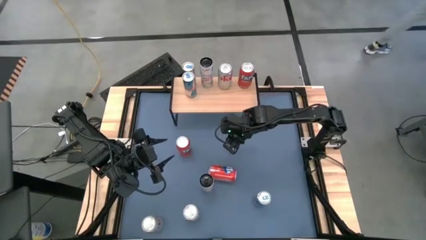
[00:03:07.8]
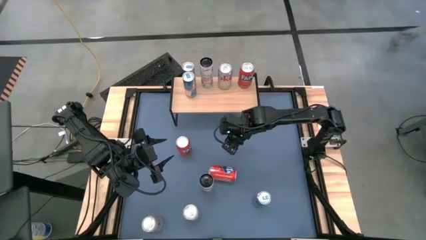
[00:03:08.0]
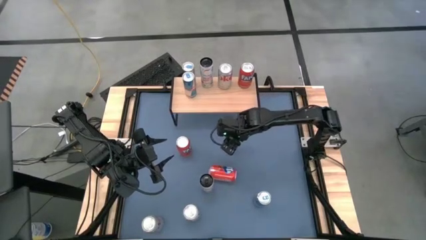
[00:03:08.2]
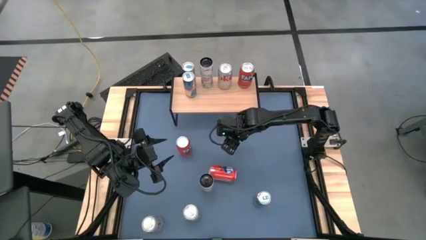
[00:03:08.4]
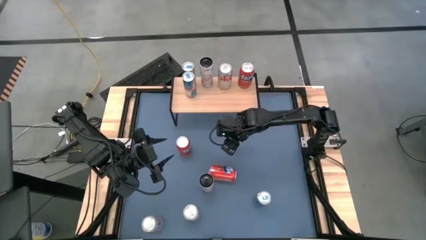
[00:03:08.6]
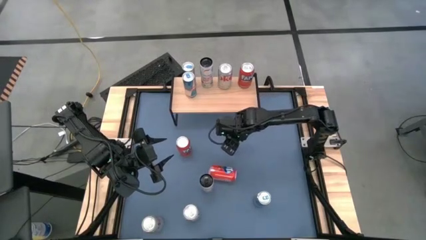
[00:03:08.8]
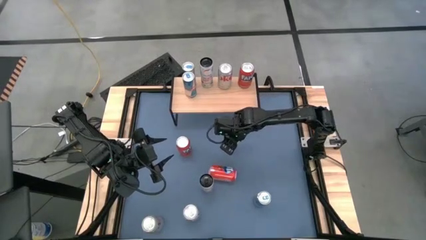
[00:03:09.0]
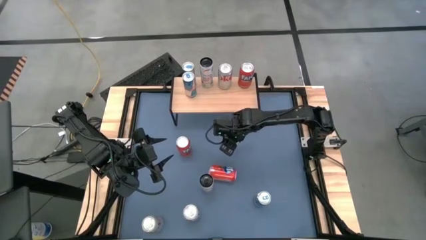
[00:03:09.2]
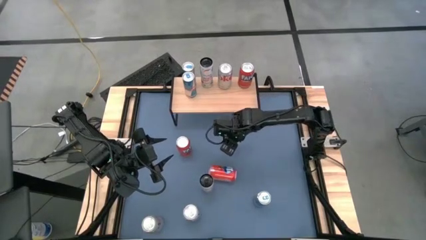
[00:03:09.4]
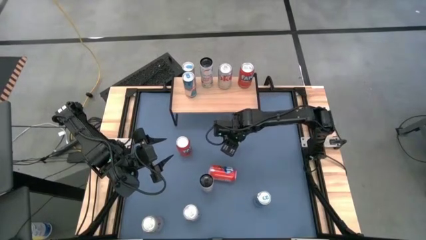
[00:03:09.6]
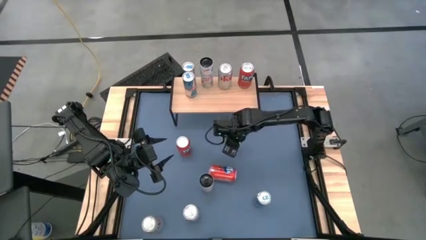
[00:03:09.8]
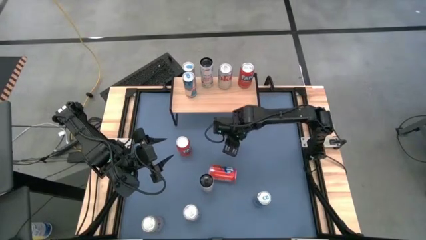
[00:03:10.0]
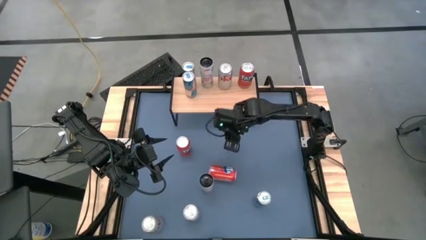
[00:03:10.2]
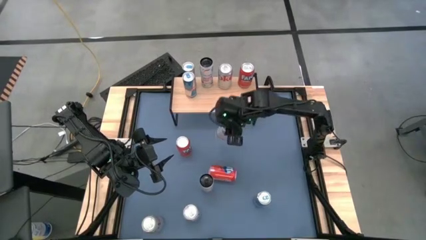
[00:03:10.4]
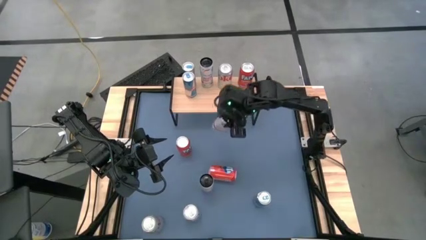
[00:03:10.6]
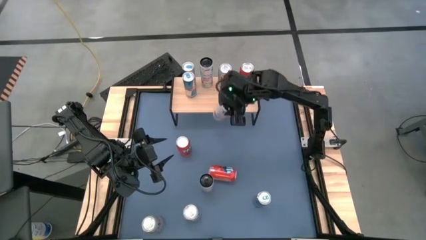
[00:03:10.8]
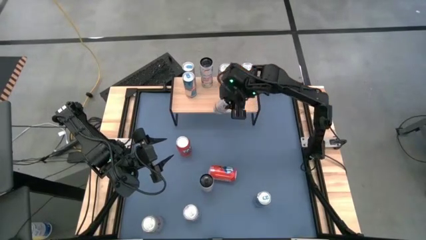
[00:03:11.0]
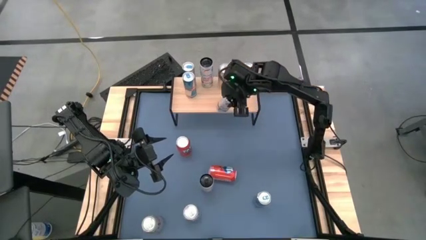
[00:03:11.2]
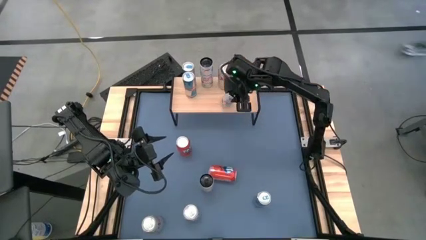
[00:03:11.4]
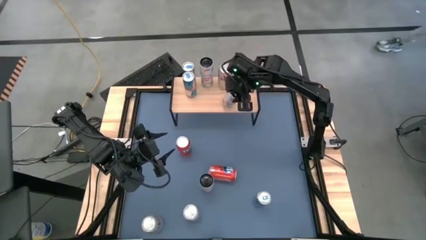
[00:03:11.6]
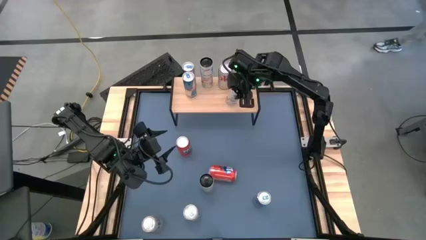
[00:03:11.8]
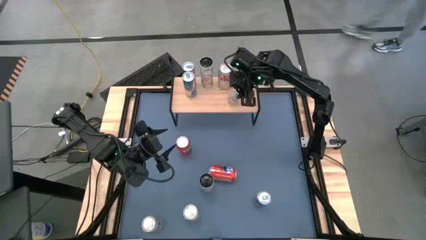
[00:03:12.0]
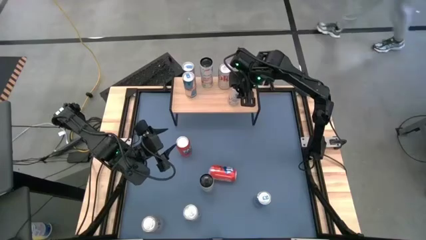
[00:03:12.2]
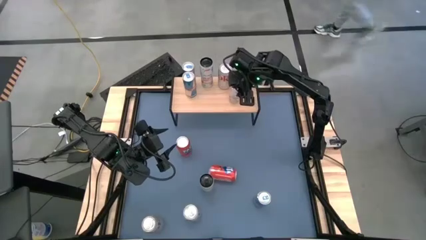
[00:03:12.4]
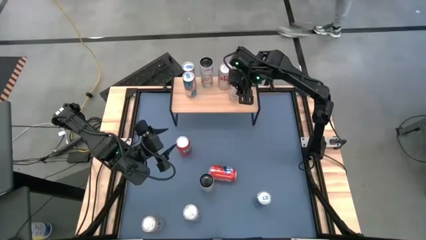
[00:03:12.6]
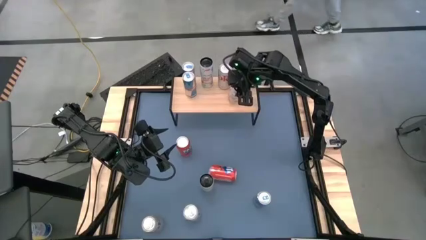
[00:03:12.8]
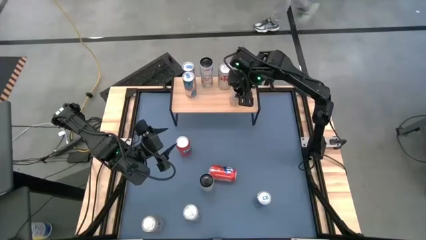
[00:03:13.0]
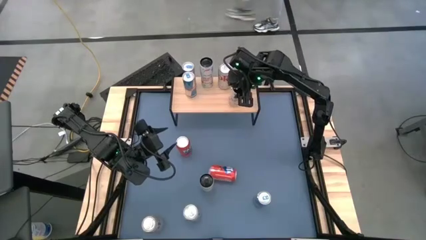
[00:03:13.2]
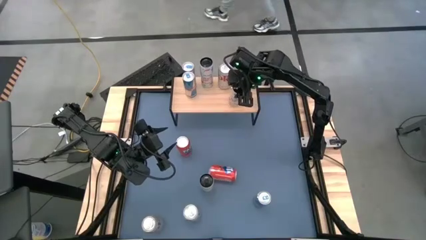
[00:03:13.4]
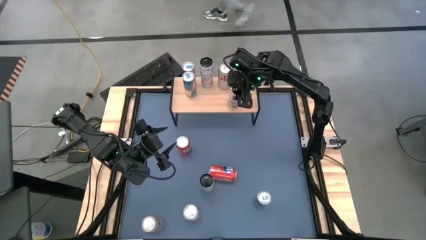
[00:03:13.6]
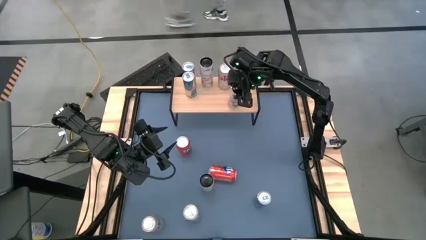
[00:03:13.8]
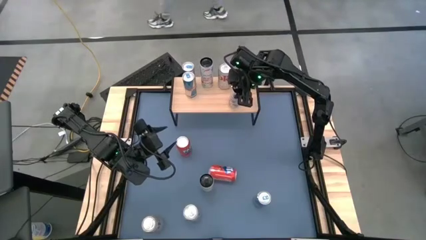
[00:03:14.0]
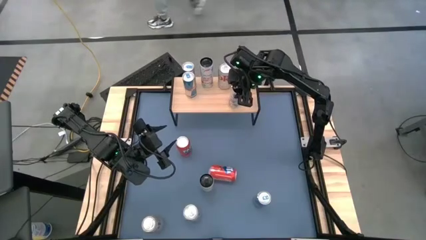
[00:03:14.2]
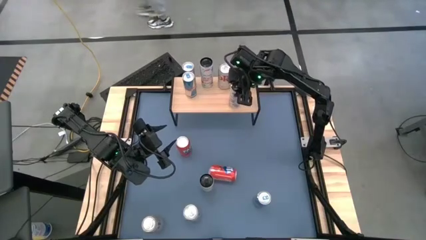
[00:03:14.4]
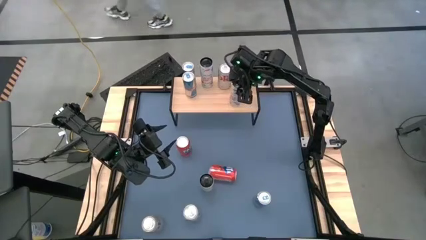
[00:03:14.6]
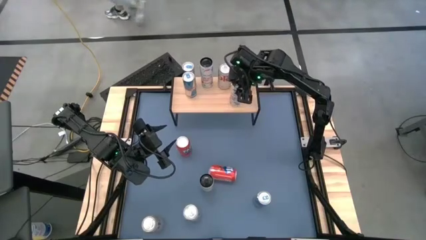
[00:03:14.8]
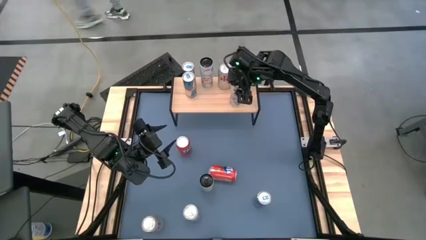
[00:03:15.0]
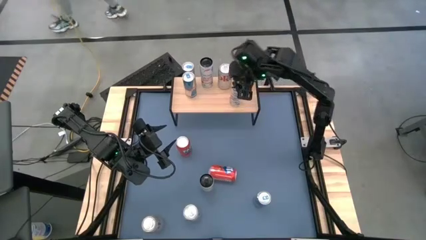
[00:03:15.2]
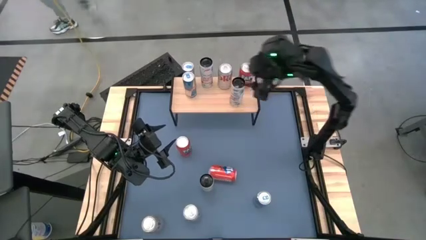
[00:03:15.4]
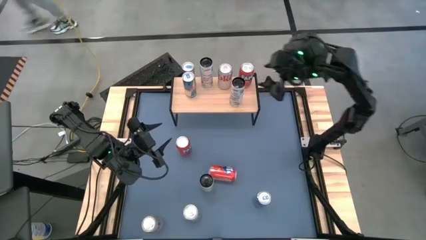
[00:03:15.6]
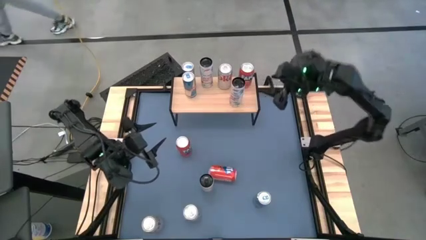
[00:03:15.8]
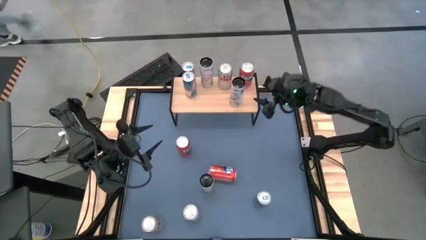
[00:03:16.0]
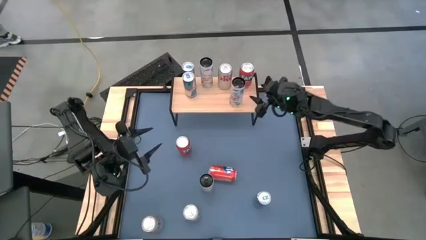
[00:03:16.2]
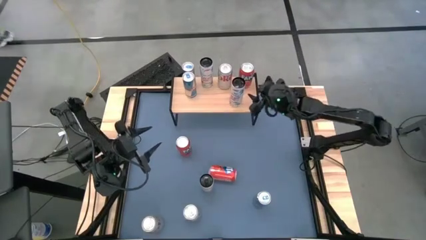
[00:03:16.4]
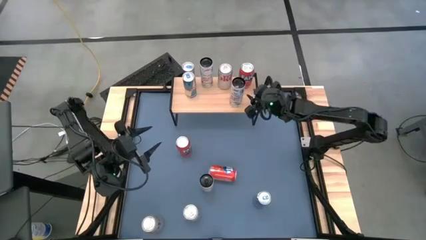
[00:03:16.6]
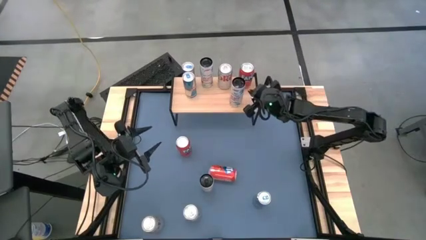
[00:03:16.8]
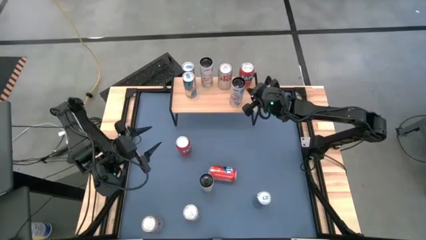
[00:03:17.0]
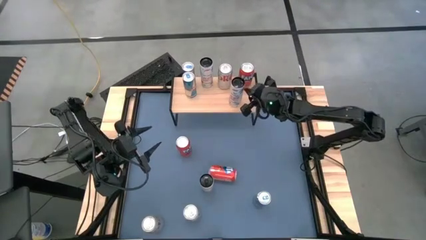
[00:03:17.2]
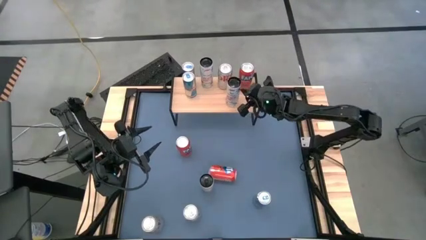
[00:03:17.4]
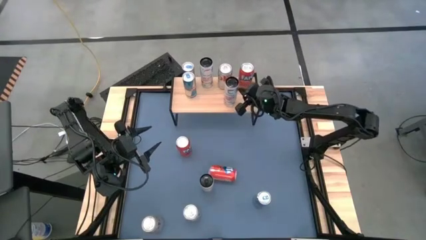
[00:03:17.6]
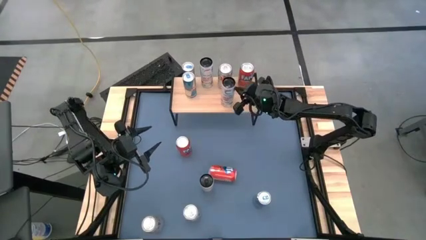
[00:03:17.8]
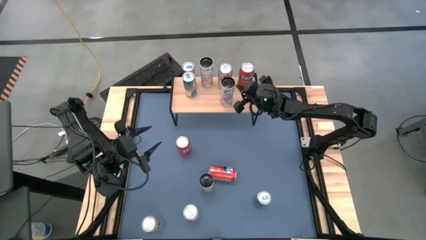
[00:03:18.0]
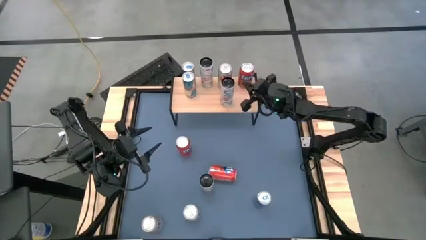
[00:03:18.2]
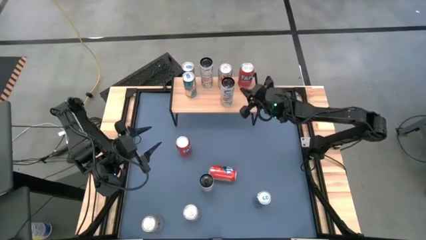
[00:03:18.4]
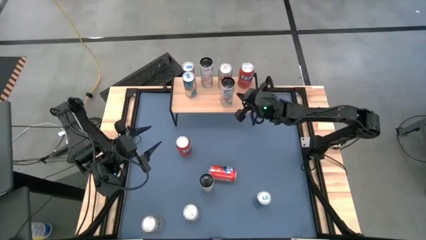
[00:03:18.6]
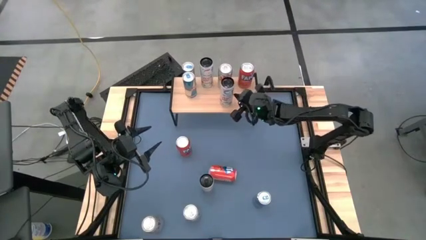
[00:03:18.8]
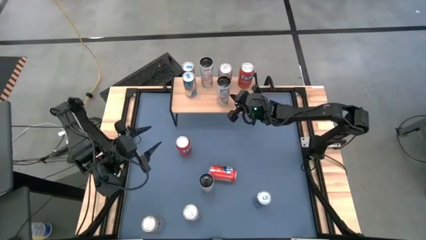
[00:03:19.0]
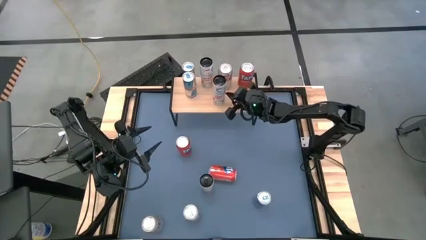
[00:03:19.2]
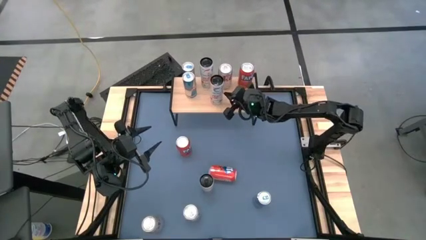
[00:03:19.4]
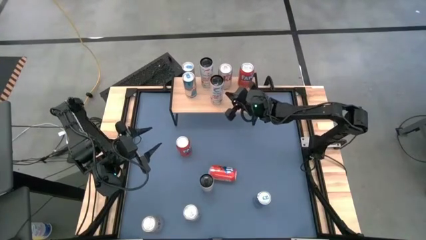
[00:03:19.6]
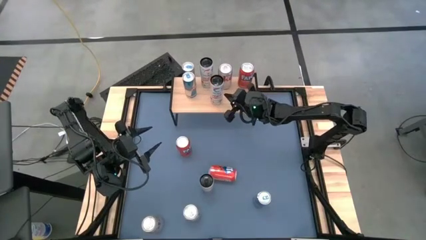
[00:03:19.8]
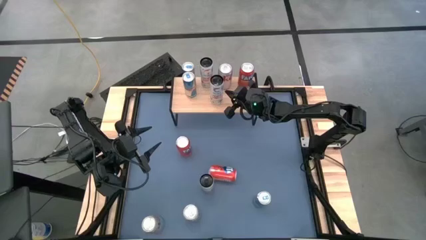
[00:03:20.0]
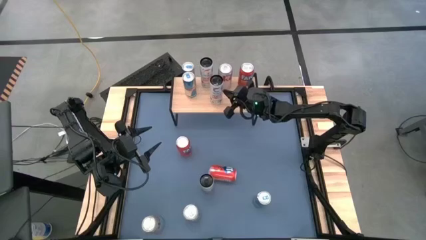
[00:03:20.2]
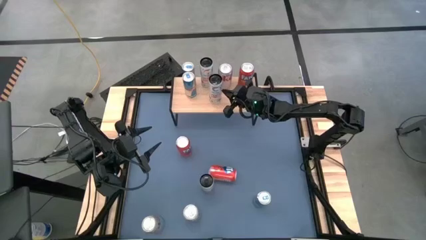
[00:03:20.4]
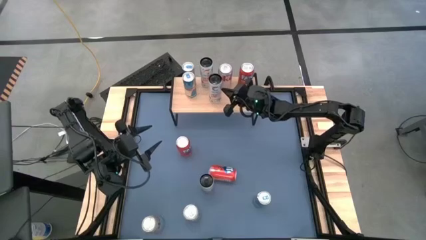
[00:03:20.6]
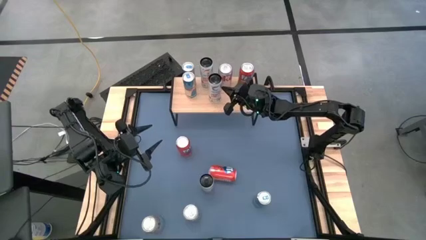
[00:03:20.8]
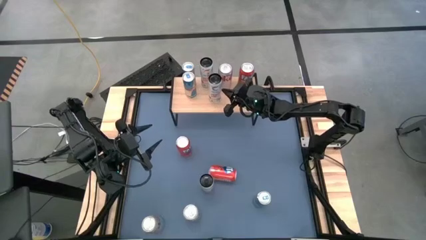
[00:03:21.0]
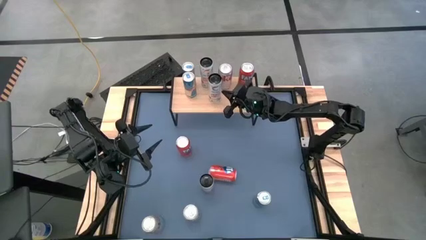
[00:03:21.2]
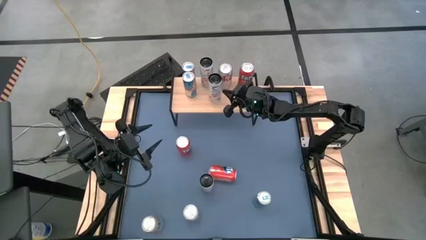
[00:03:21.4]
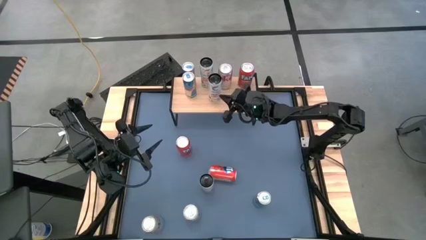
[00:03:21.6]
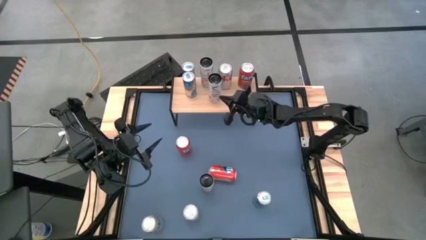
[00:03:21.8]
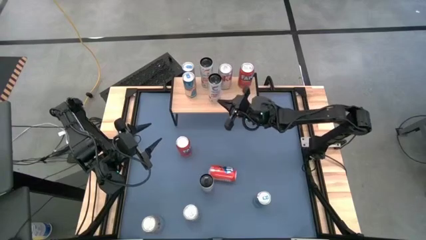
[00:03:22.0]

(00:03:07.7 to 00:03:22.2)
Task: Place canned beverage on shelf
Put the top right pink soda can on the shelf aligned with the other pink soda can
